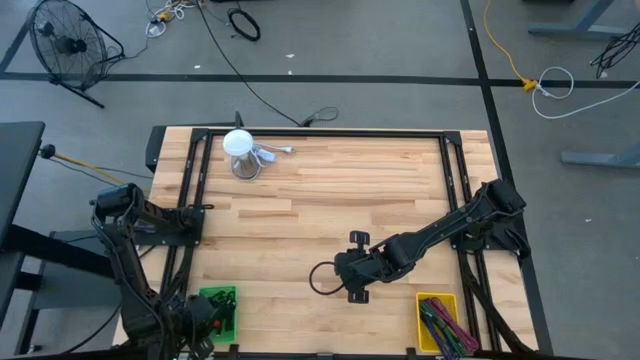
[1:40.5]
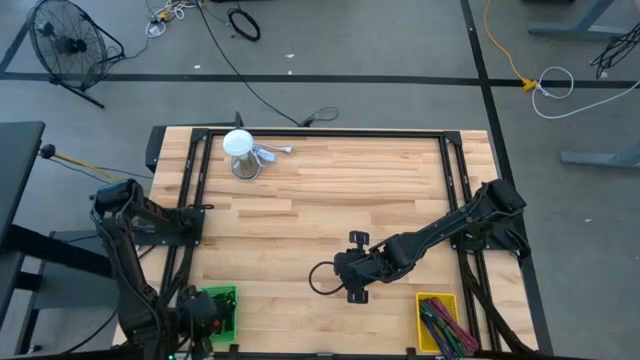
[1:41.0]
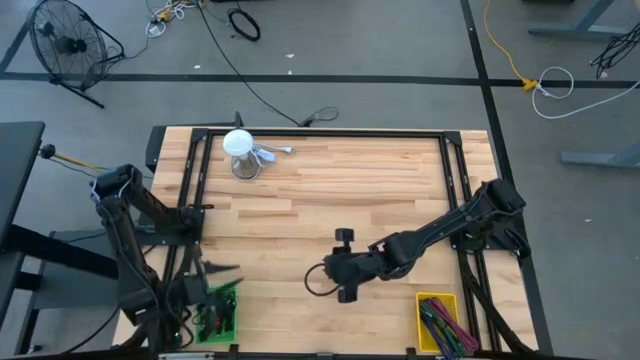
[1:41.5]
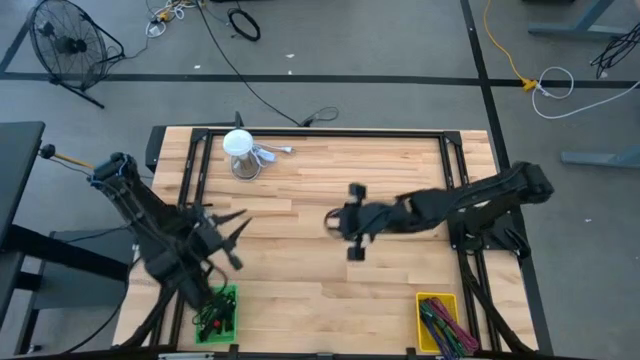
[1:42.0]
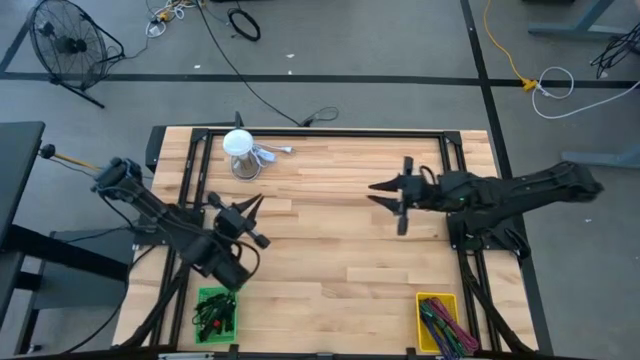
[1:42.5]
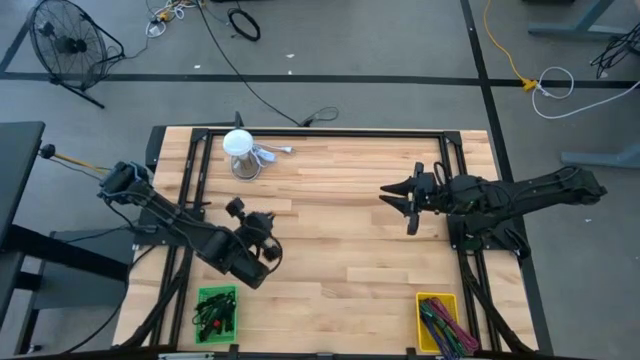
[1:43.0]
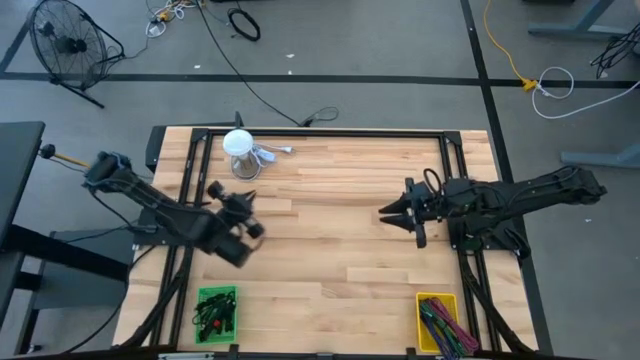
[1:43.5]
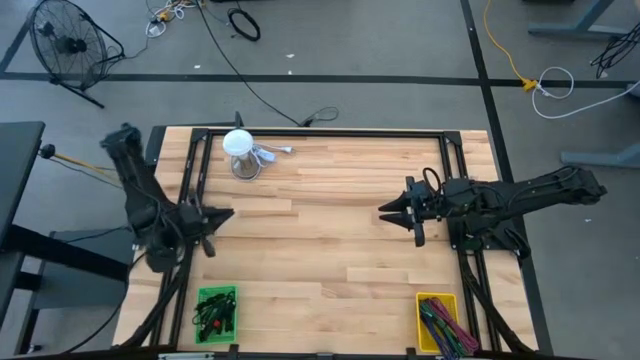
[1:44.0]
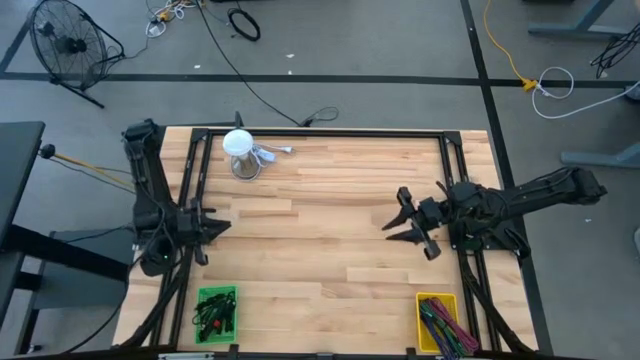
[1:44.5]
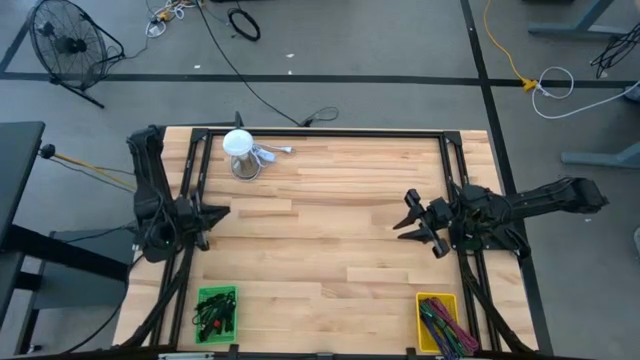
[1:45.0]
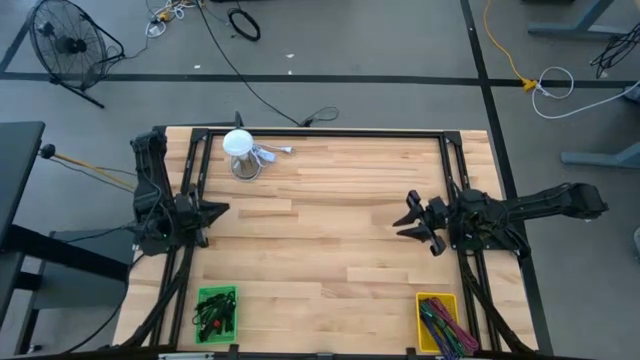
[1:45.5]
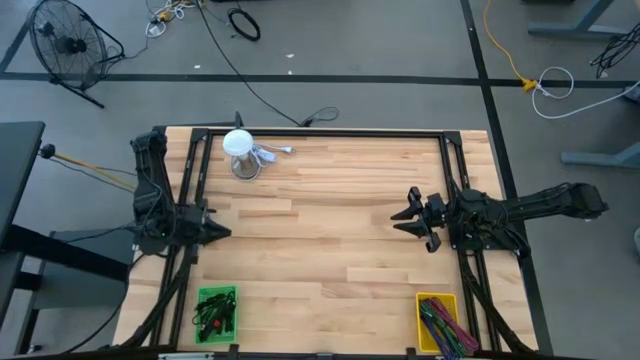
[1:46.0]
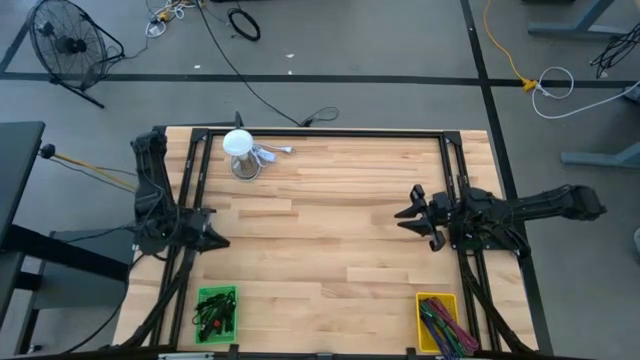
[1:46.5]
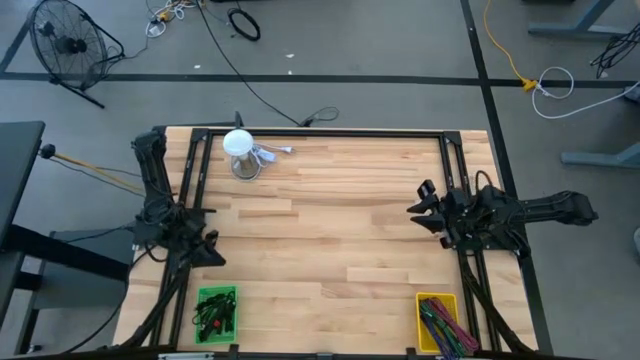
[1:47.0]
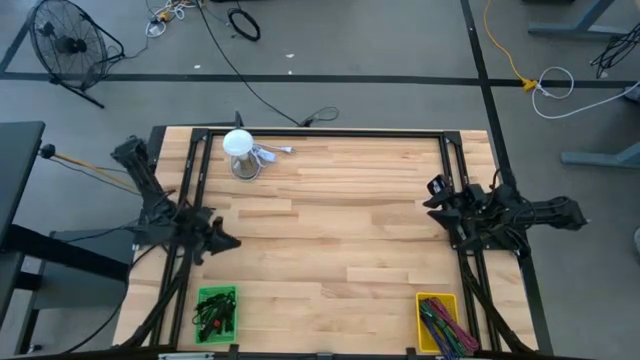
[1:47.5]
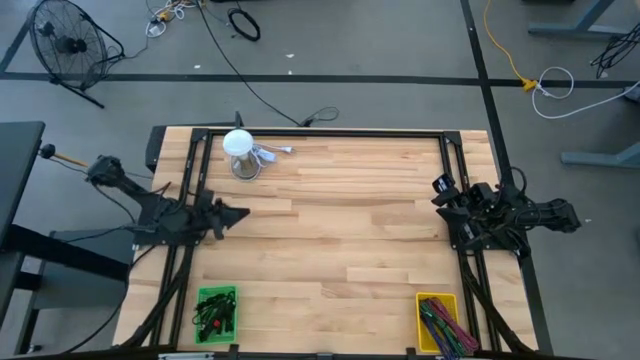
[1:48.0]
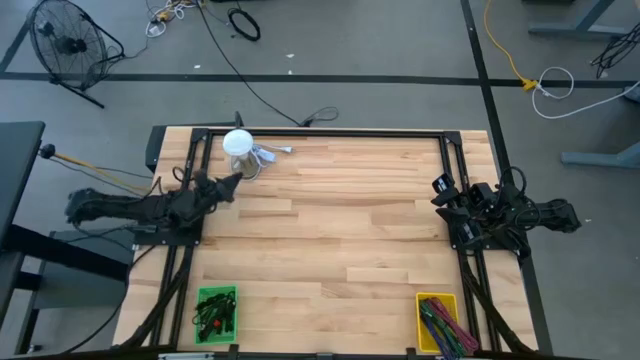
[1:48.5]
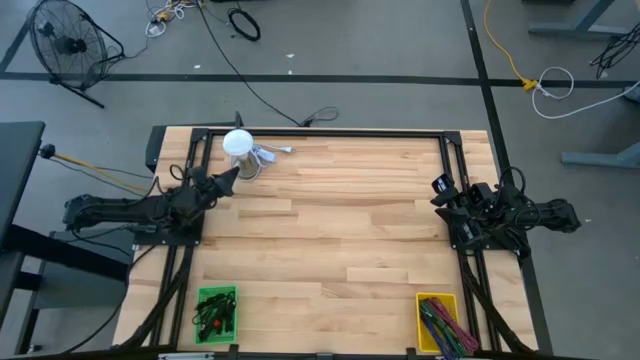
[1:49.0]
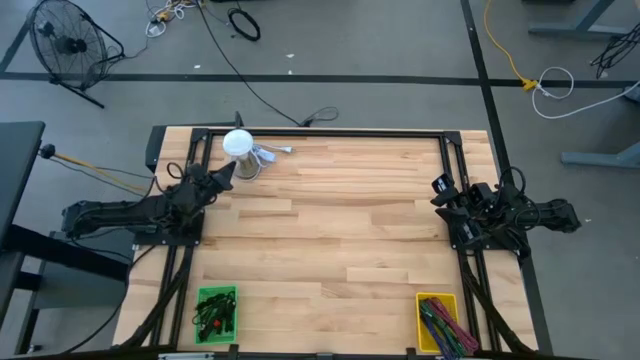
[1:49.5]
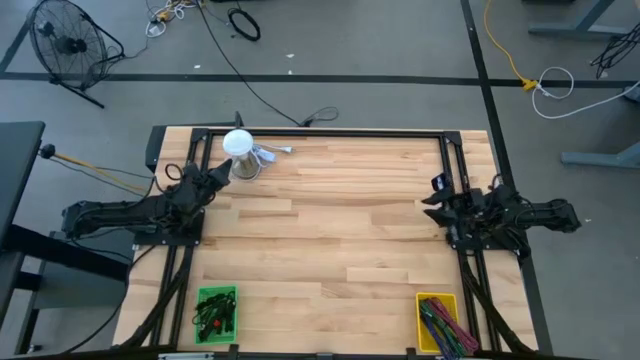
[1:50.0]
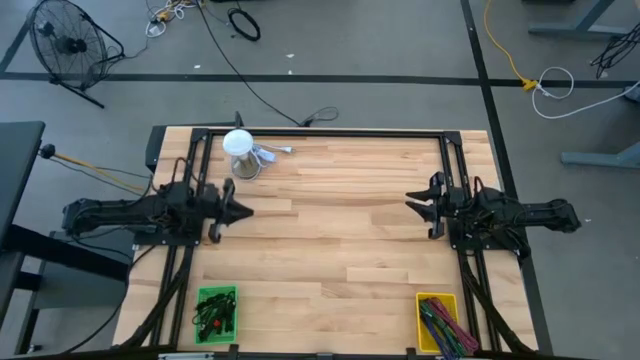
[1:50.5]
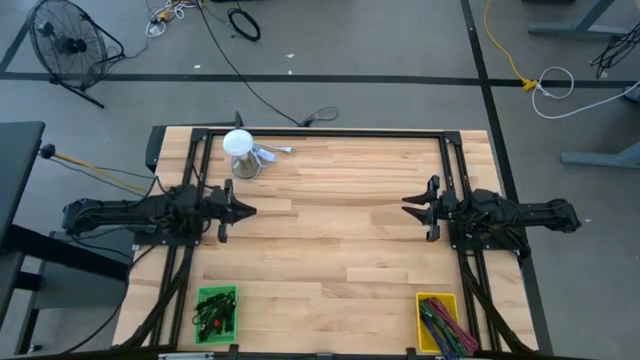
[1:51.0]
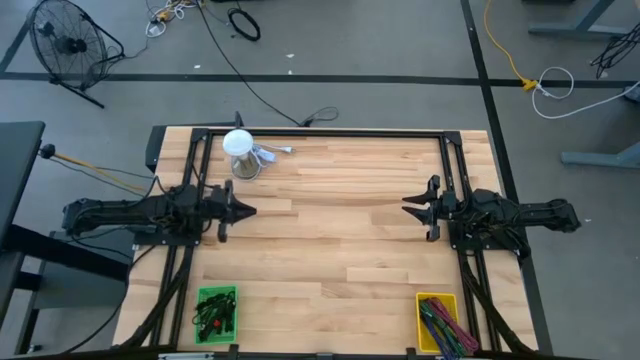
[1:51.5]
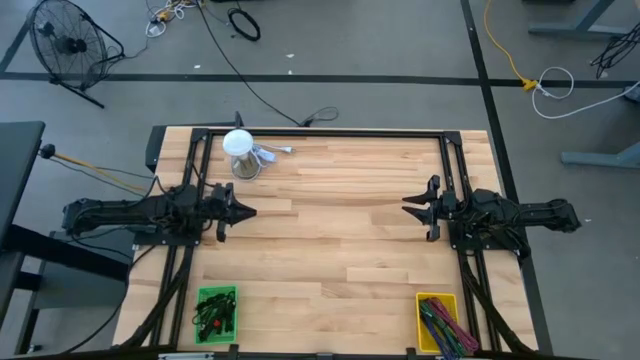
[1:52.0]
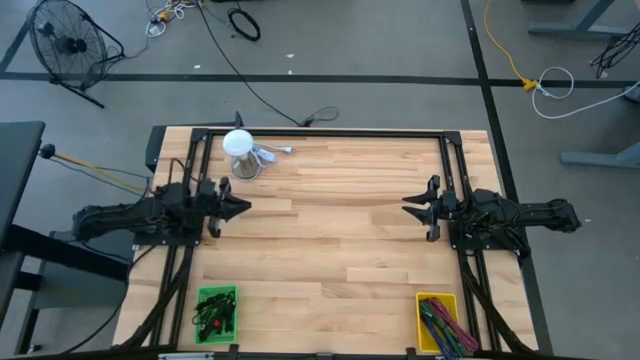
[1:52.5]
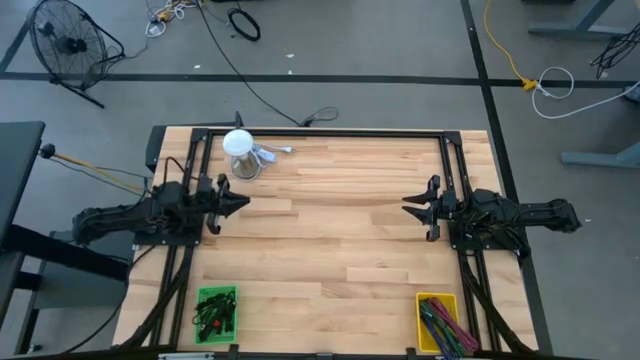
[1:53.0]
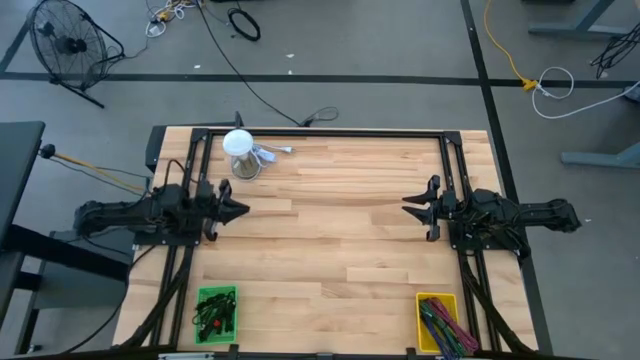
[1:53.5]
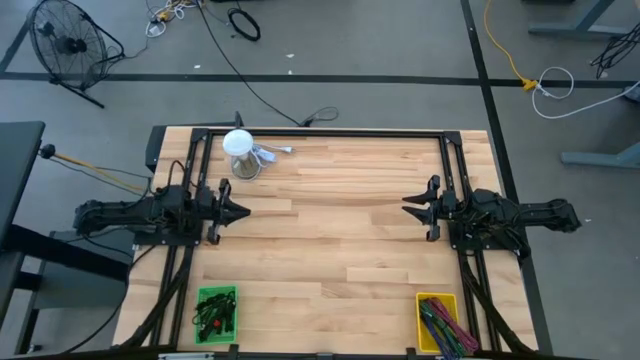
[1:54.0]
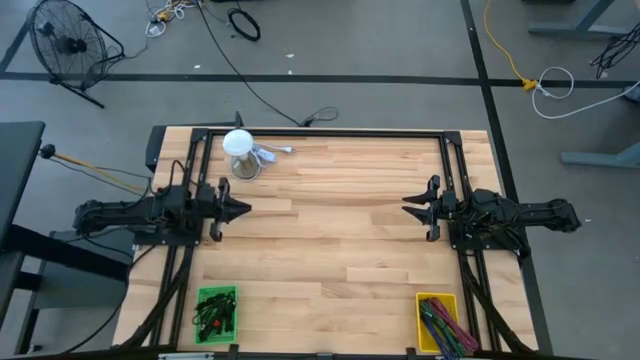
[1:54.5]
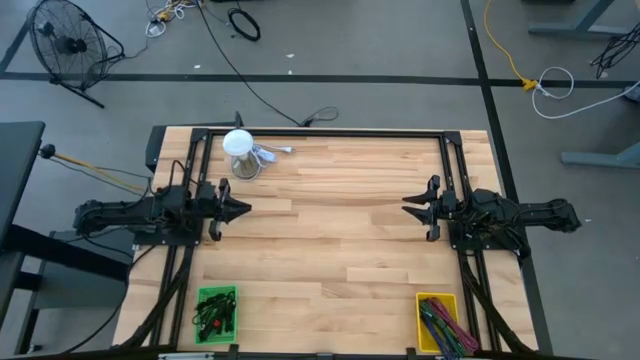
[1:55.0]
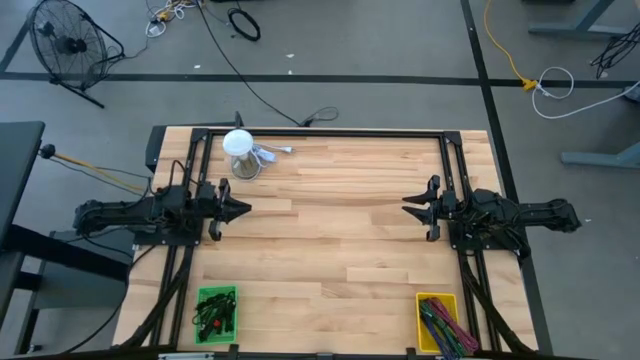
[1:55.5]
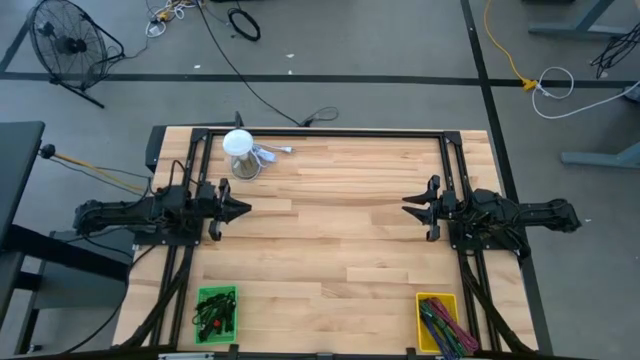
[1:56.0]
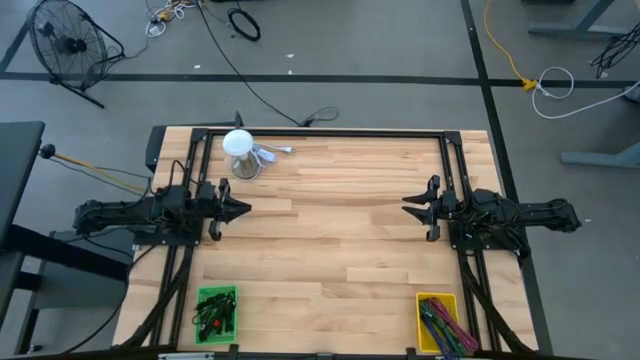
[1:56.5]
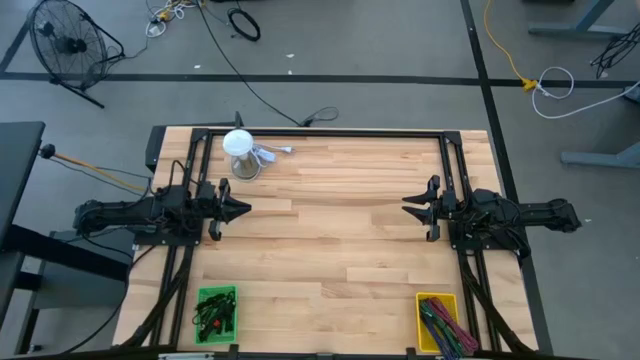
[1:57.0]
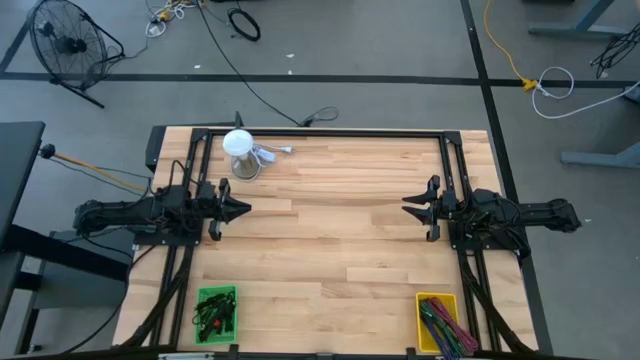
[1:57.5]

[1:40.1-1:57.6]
Task: Pick & Place USB Port
Return to Home Position
